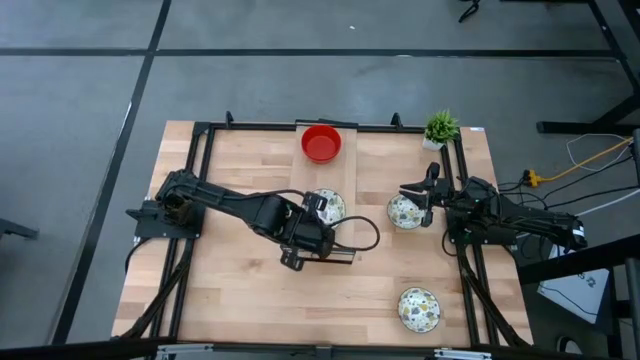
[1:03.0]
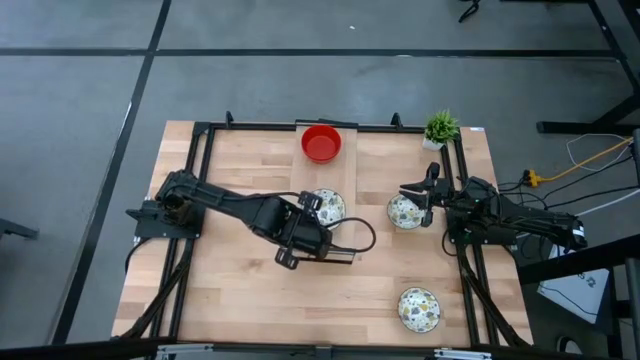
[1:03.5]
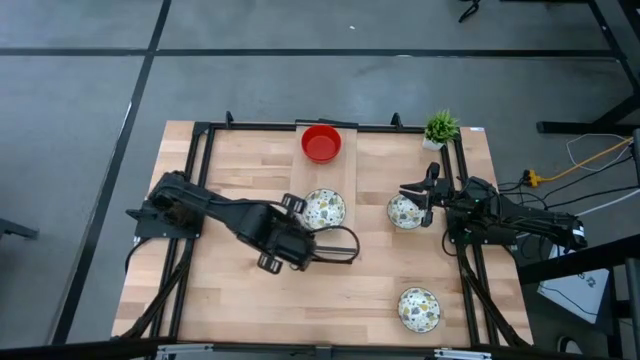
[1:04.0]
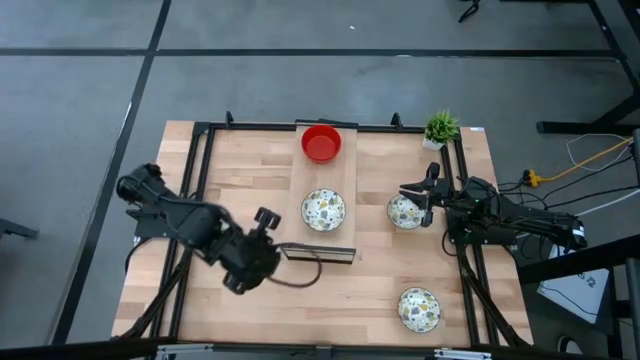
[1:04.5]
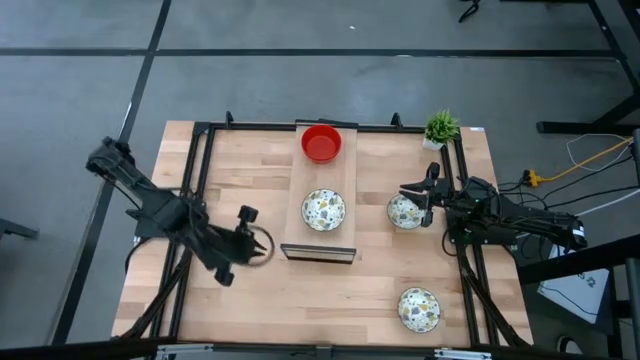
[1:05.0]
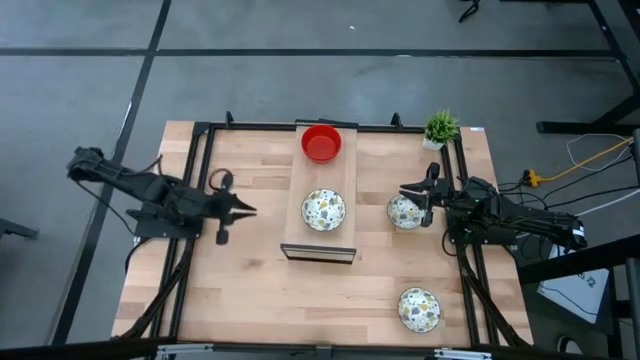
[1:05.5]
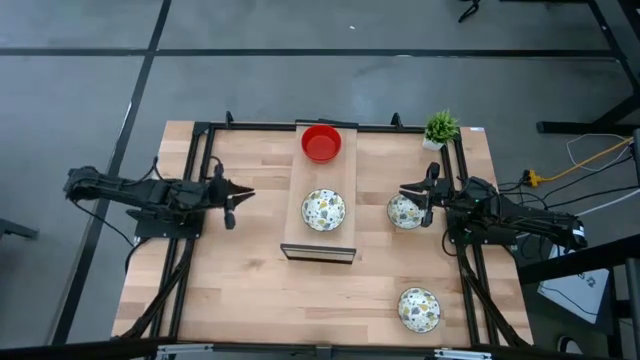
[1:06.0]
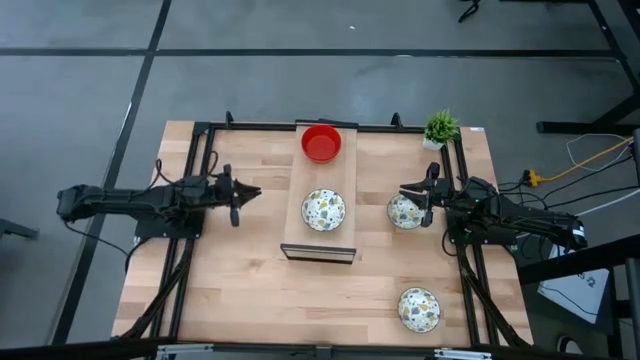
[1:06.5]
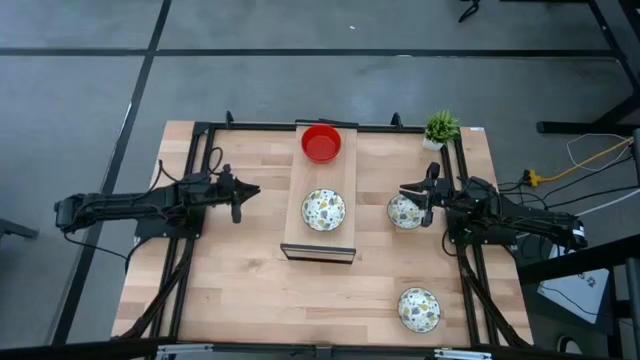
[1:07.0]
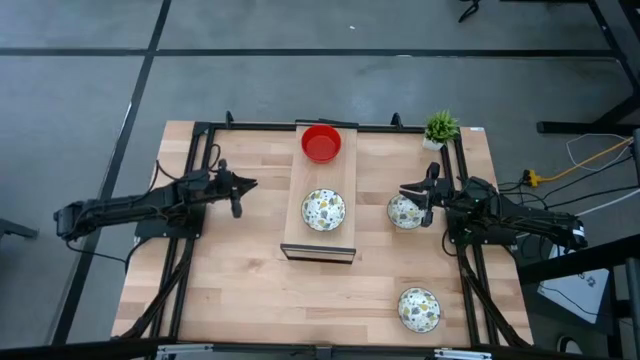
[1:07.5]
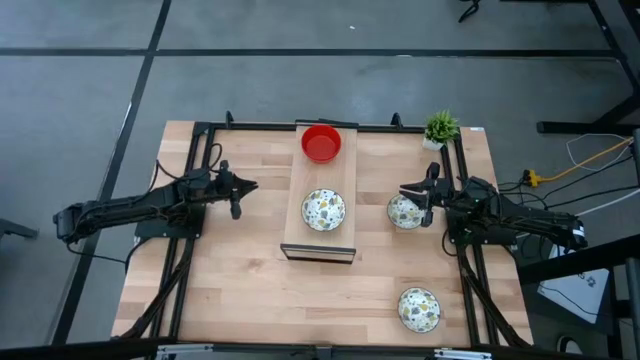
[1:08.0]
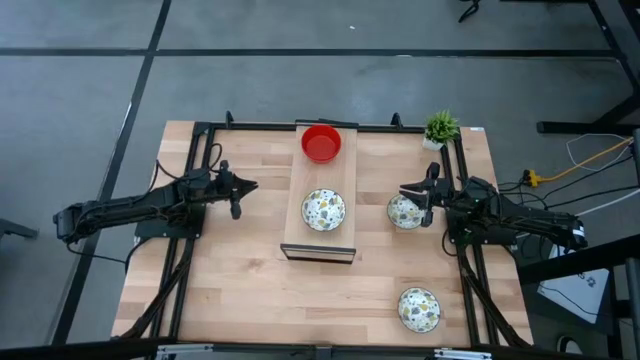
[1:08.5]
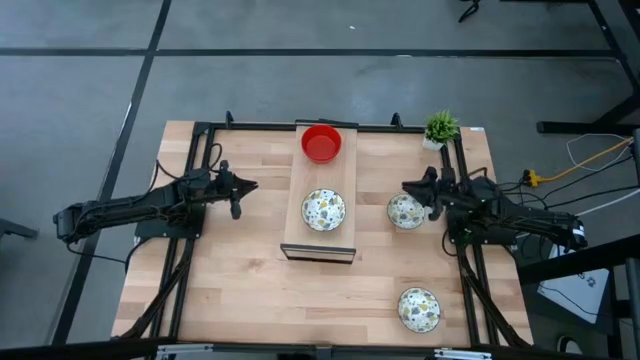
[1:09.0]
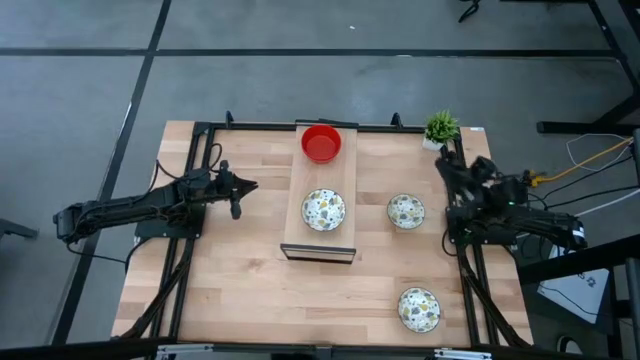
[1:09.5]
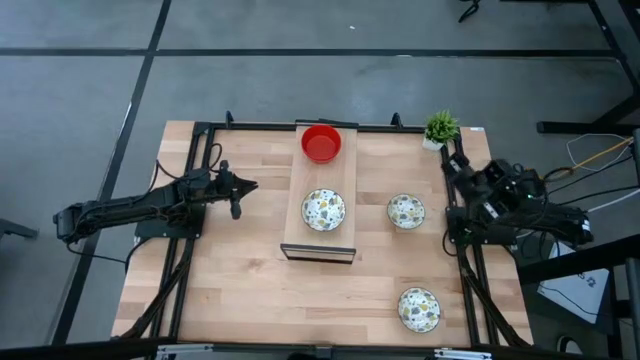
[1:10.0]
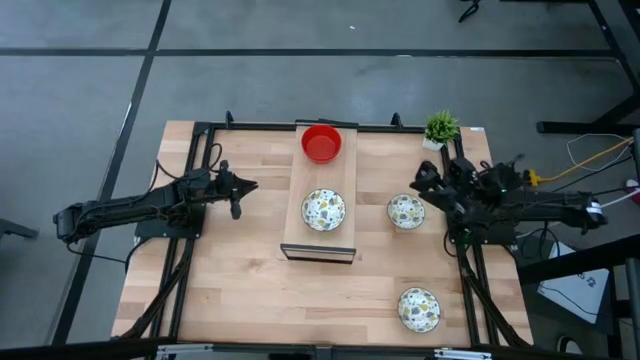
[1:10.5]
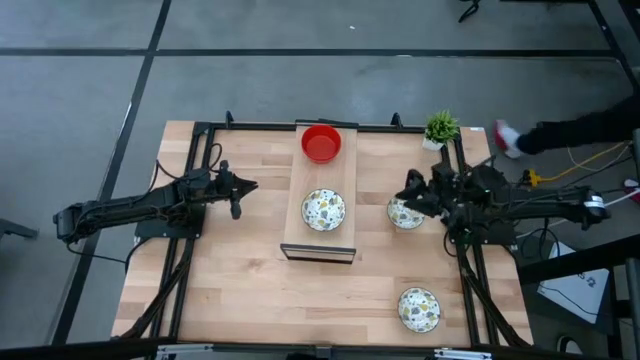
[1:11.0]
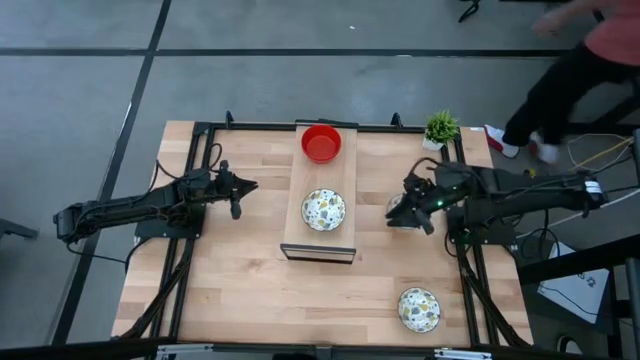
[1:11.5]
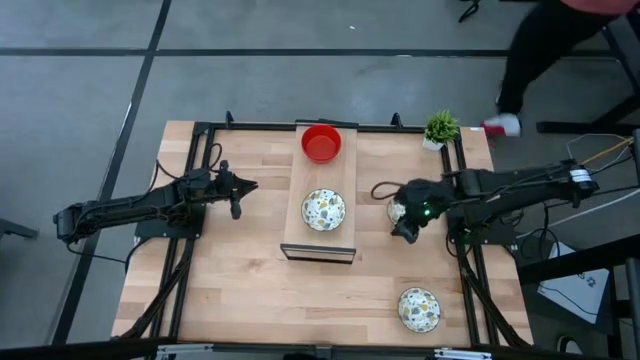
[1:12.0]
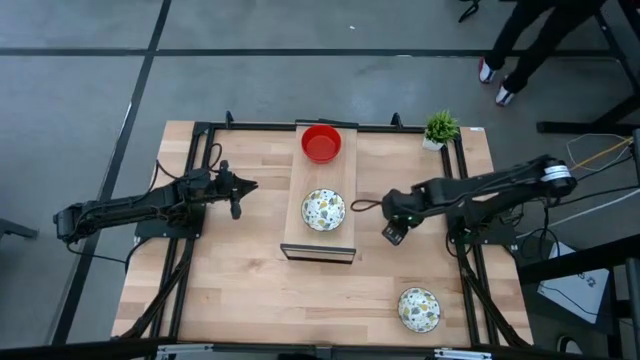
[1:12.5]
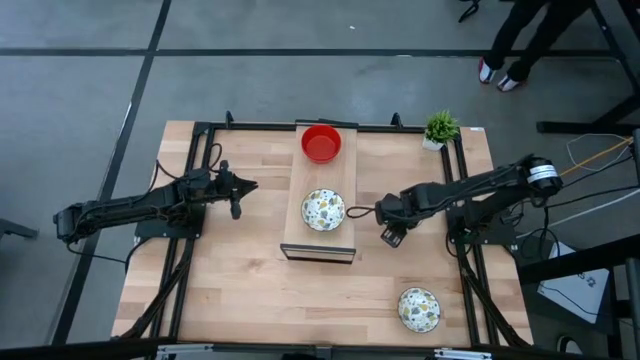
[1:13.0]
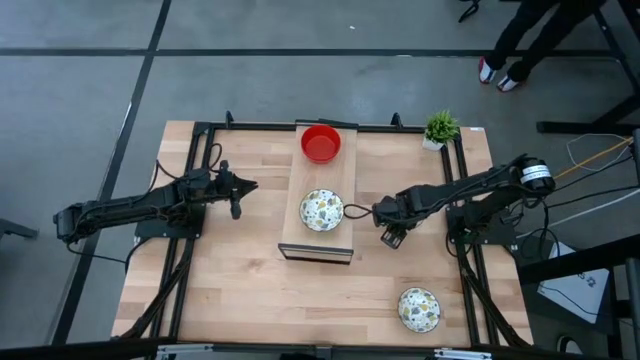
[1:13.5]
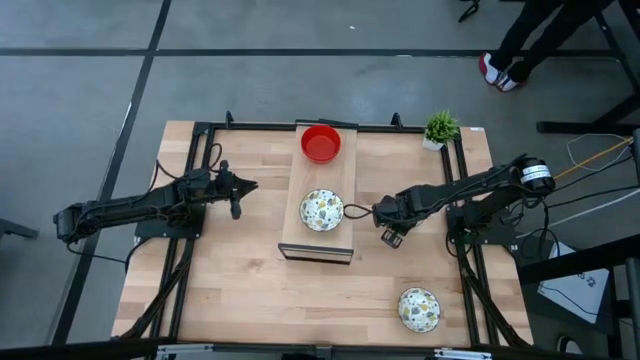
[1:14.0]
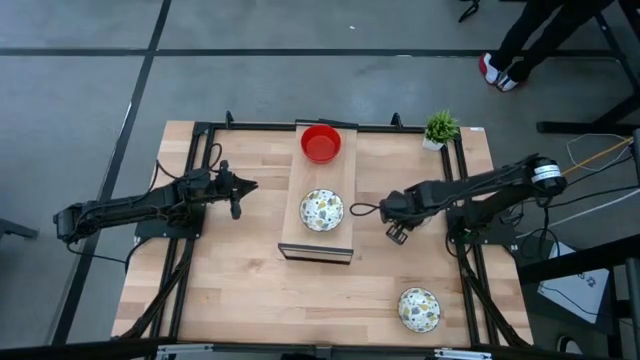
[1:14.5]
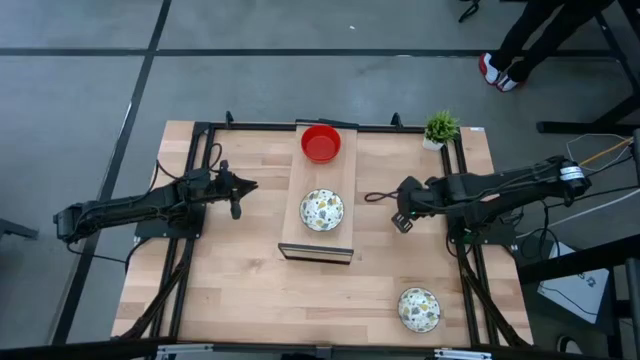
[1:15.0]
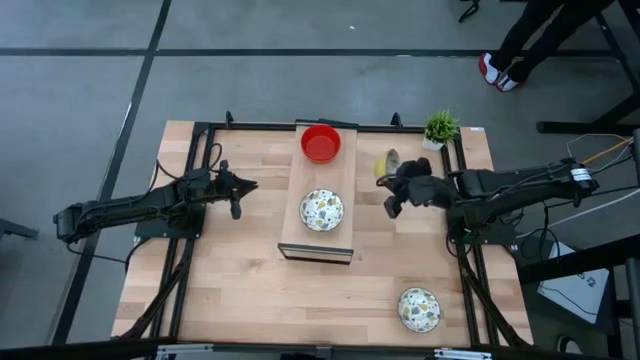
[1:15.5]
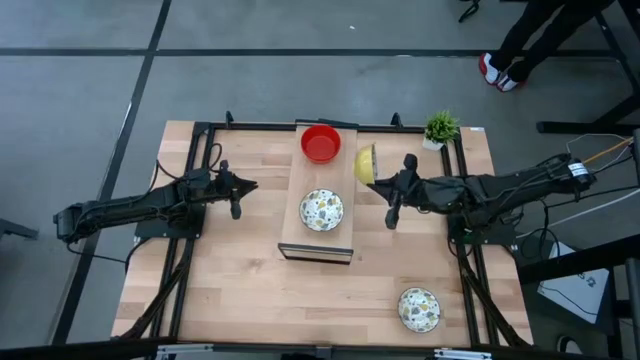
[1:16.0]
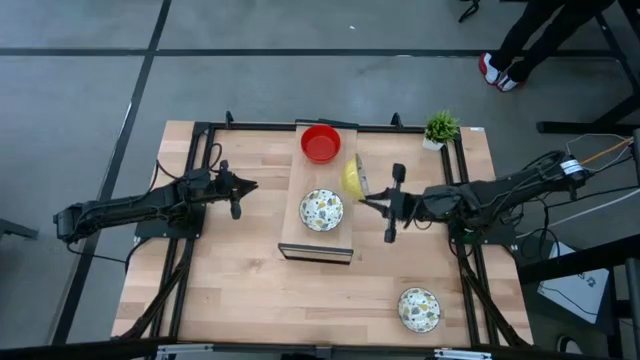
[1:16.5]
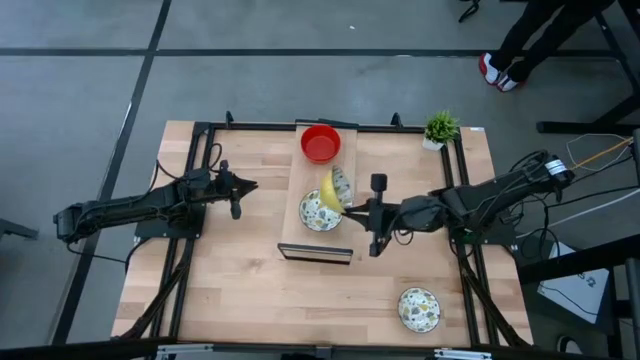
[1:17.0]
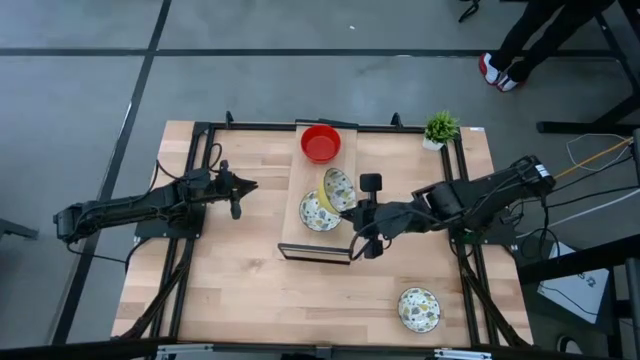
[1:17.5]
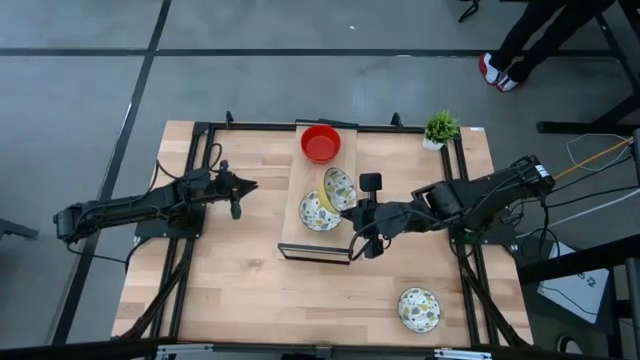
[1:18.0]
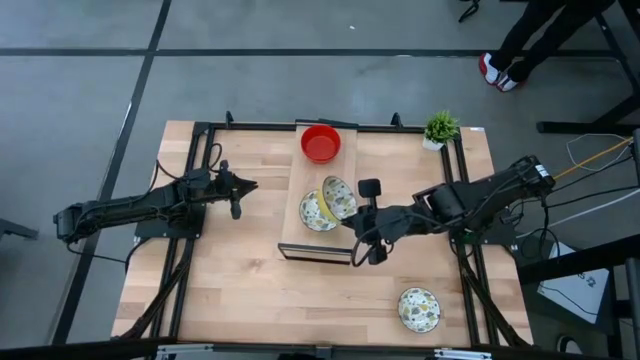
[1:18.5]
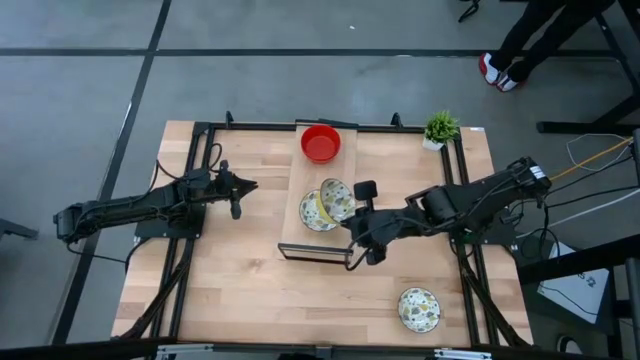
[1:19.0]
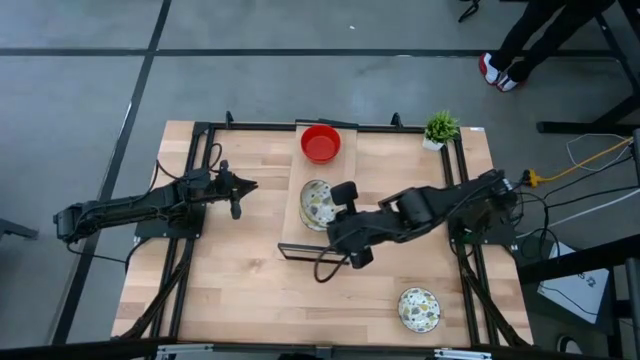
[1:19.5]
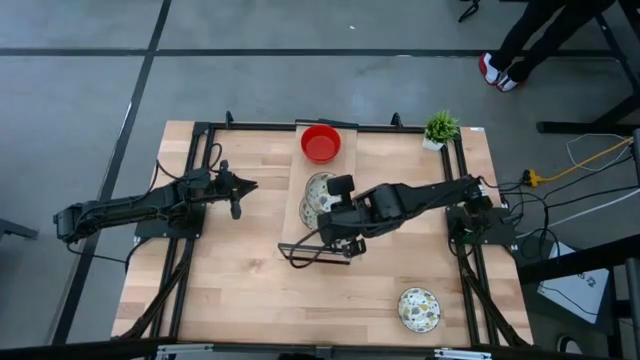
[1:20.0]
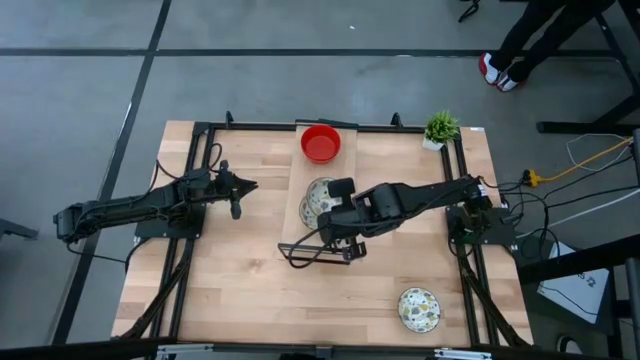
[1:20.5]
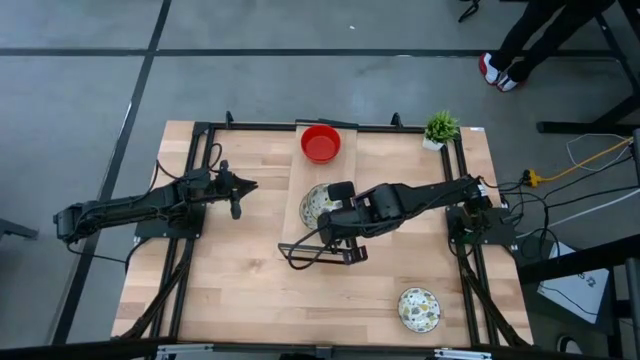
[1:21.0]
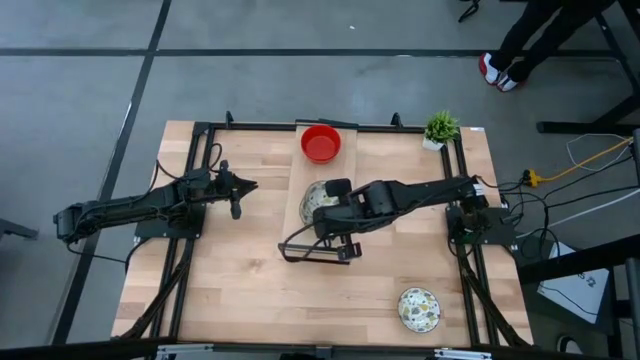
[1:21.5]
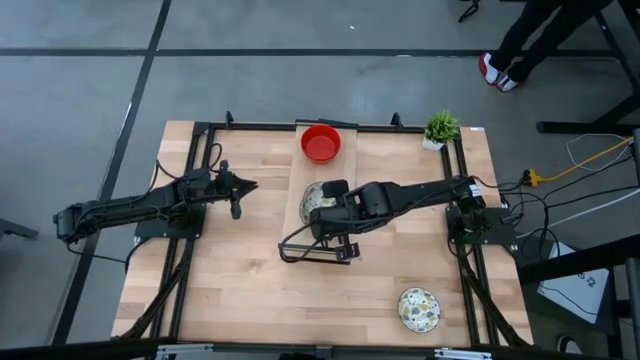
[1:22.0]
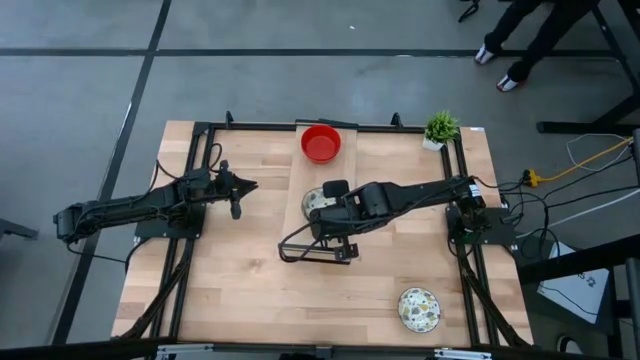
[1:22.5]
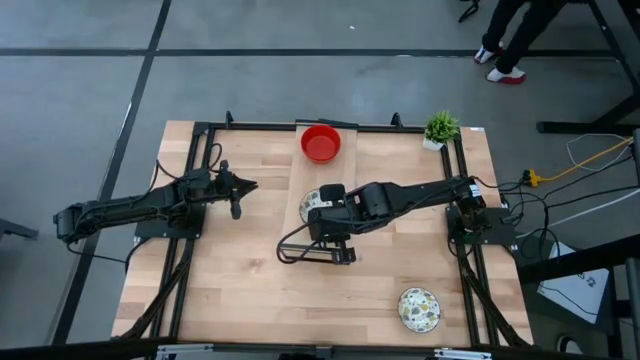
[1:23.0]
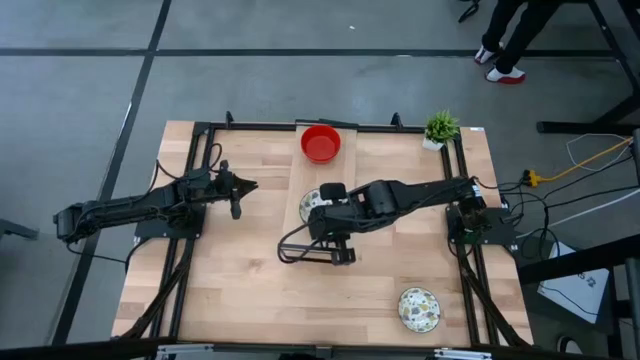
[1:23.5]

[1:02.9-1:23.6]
Task: Pick & Place Mini bowls
Stack the top white bowl on top of the white bowl on the shelf

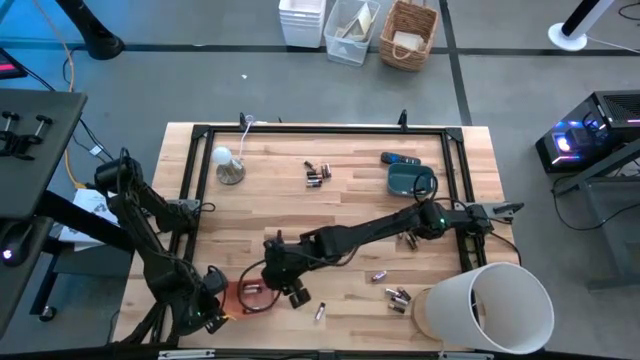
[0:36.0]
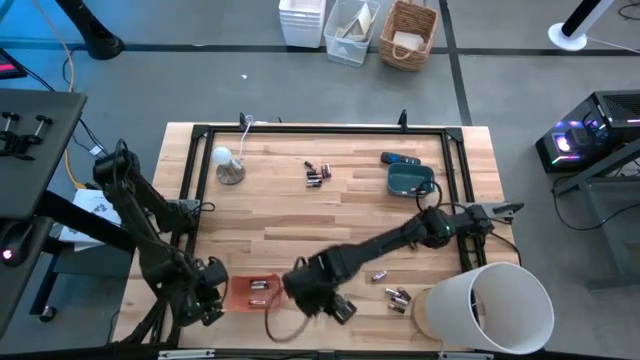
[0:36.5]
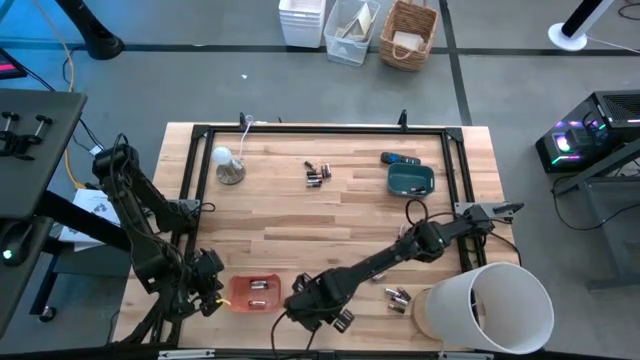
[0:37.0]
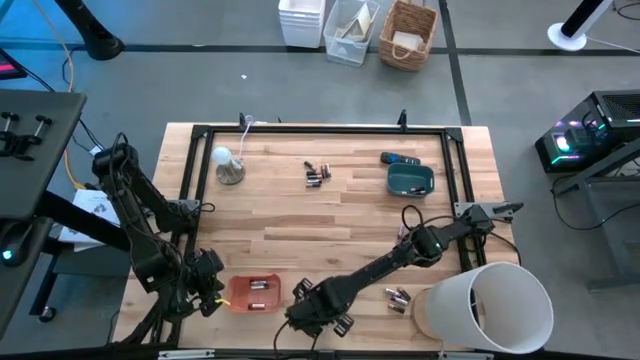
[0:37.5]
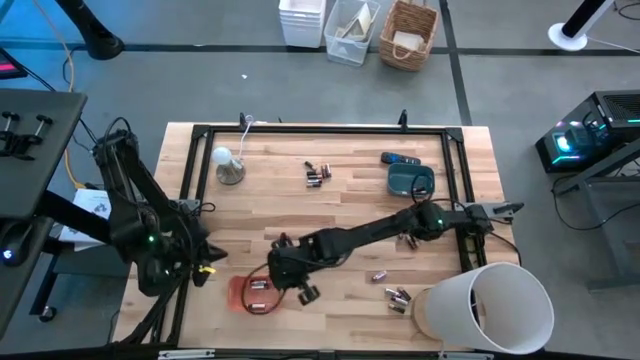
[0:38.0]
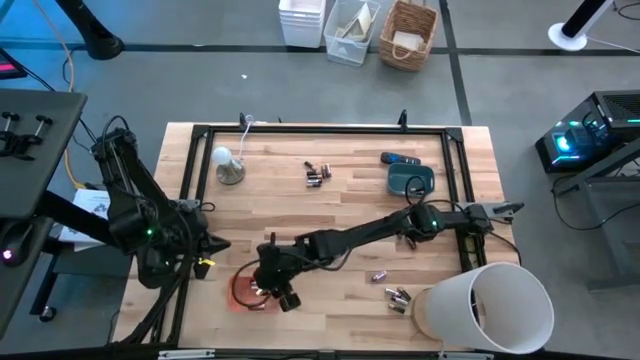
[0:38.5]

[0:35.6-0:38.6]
Task: Sort batteries
Put the silver battery into the orange bin
